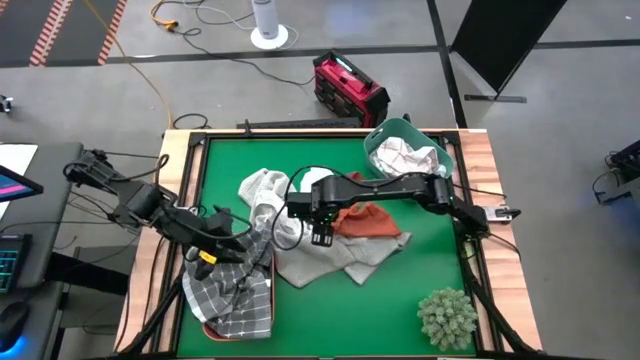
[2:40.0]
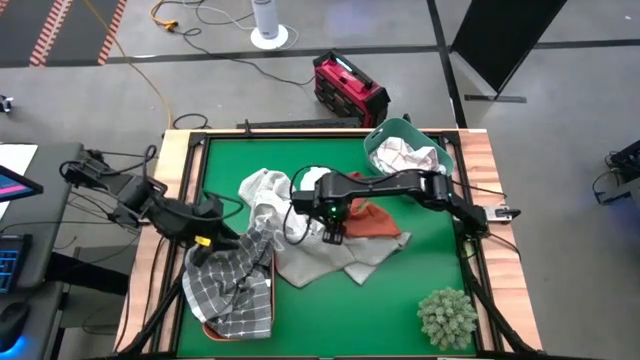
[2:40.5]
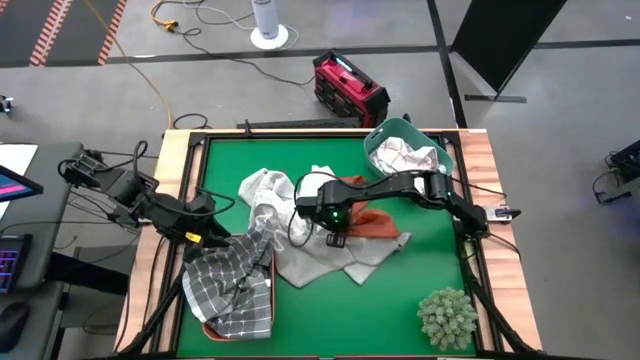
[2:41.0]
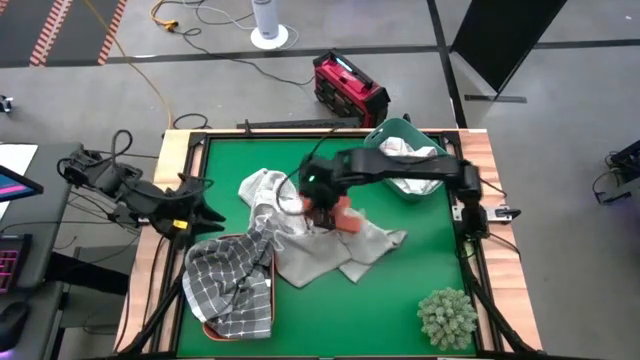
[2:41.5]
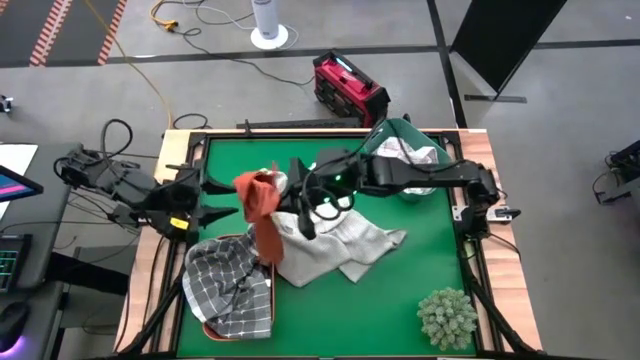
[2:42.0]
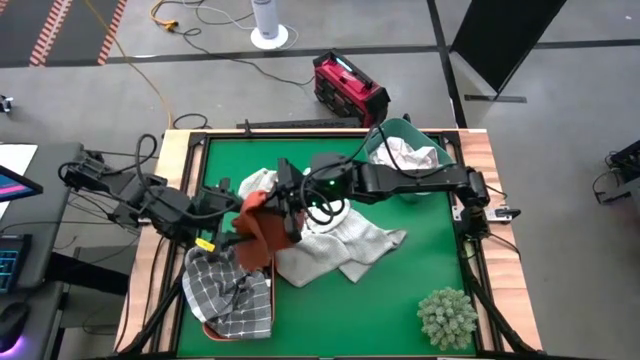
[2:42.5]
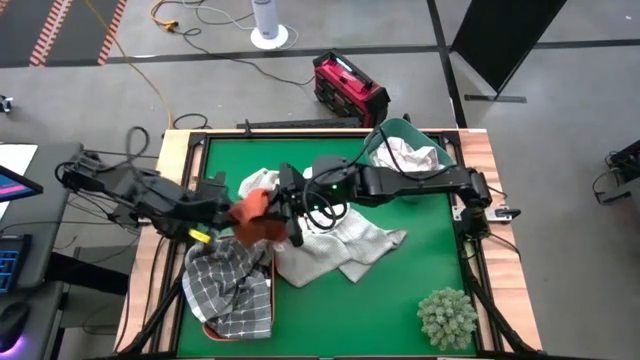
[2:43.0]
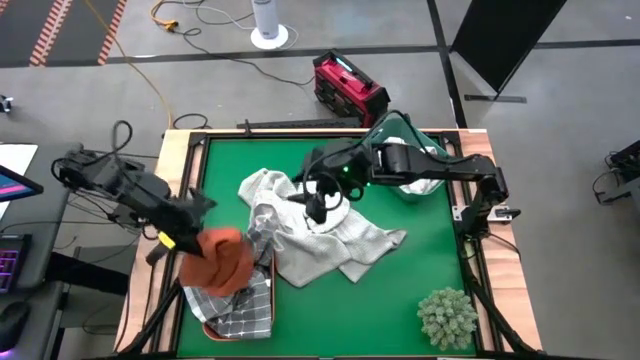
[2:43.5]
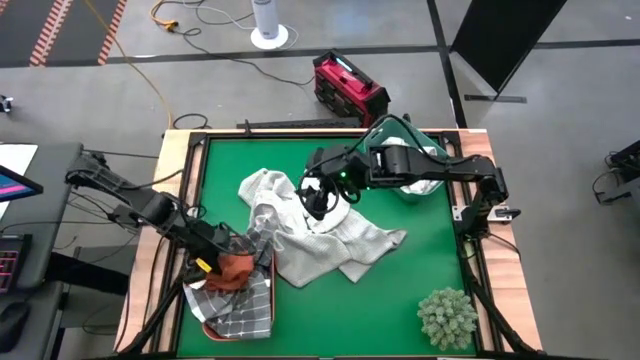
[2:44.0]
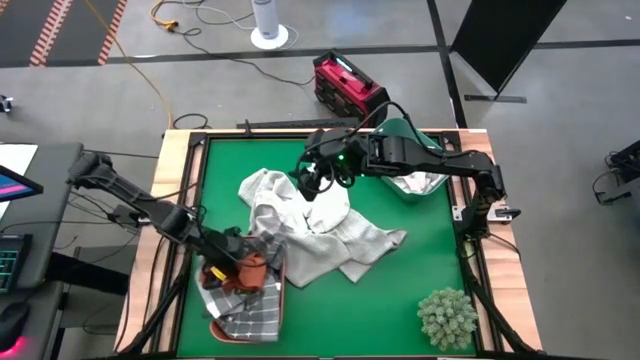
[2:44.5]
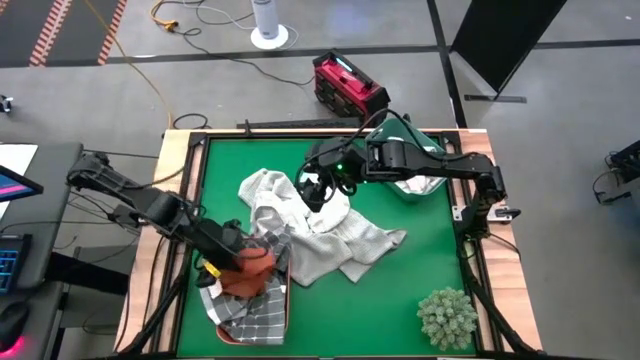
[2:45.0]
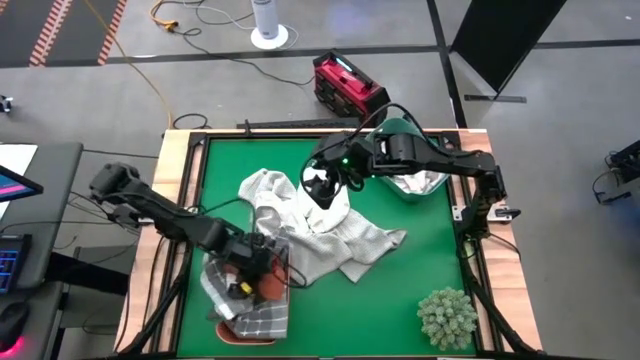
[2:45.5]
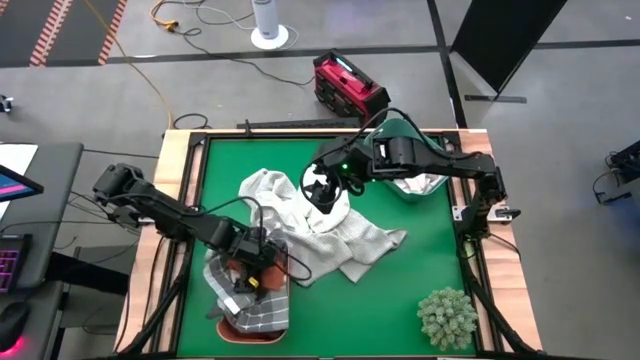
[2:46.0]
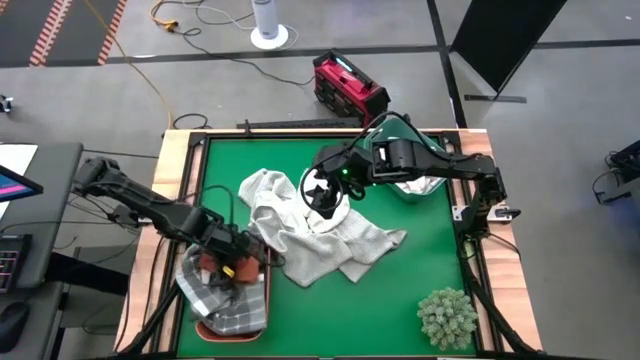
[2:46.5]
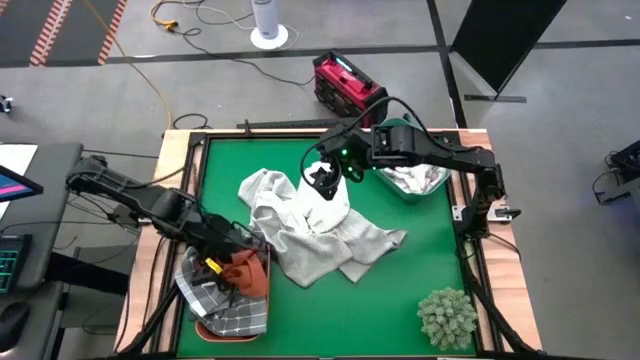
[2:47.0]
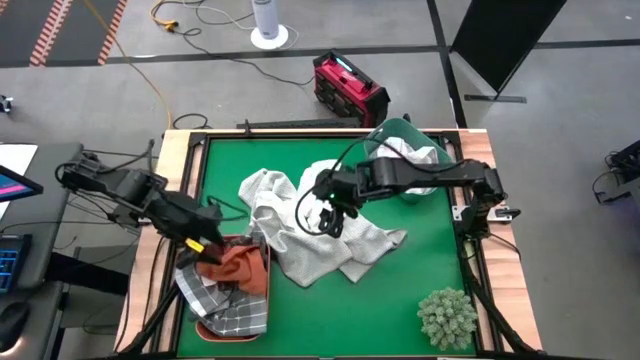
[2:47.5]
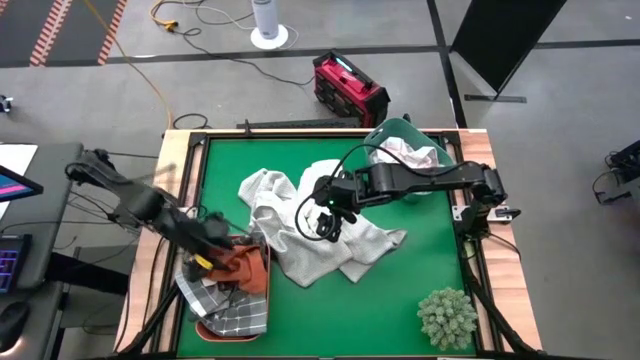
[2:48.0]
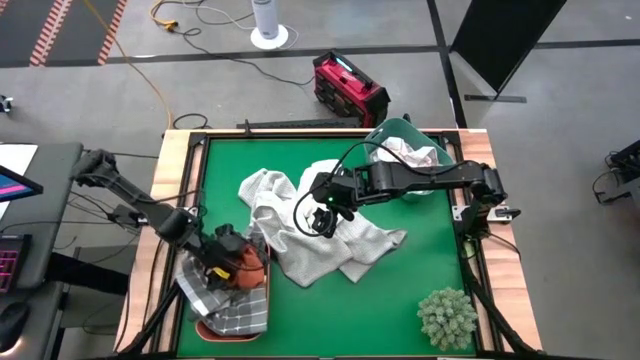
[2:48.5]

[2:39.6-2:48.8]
Task: Sort towels by color in basket
Put the orange towel into the orange bin

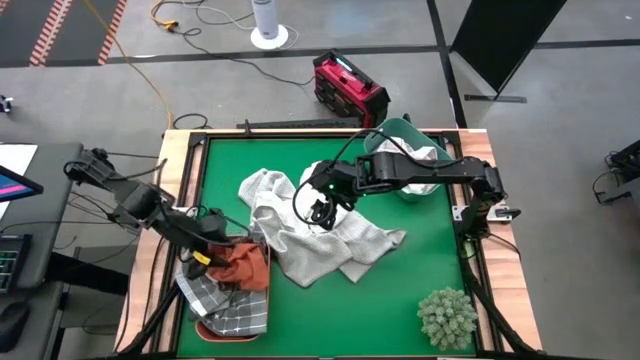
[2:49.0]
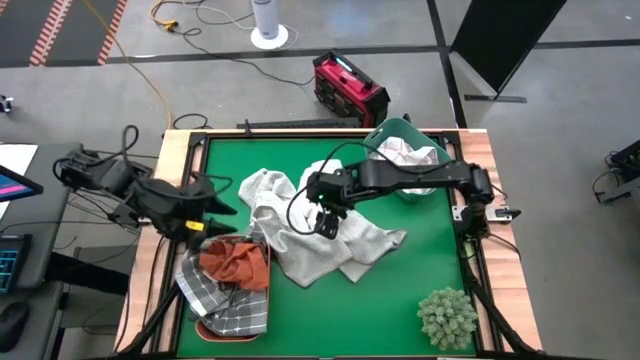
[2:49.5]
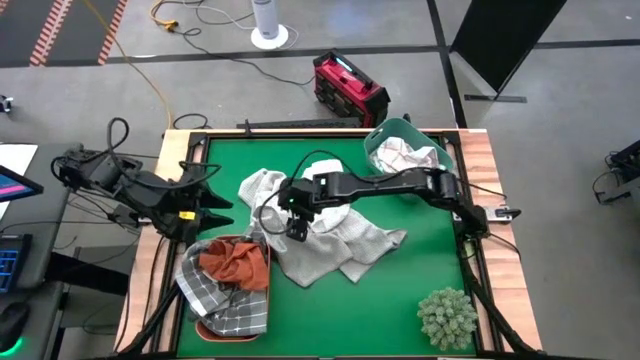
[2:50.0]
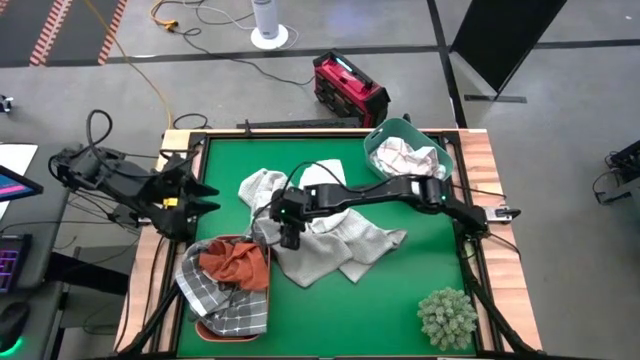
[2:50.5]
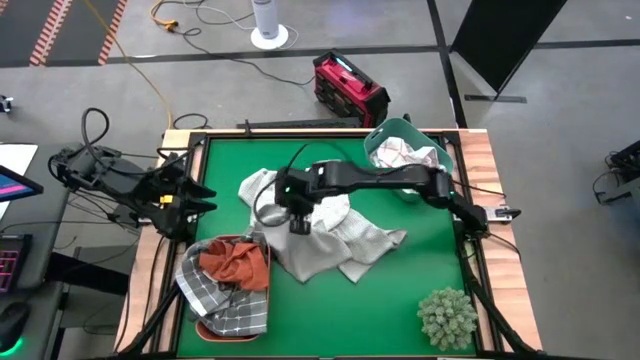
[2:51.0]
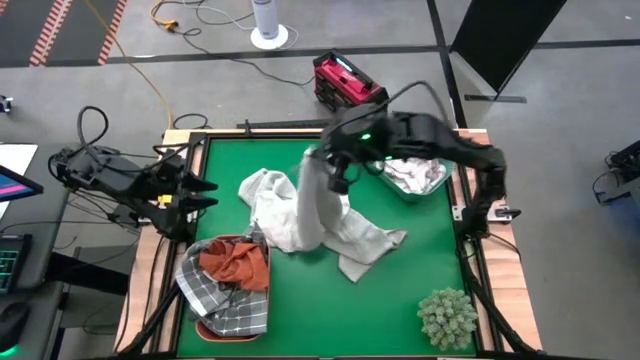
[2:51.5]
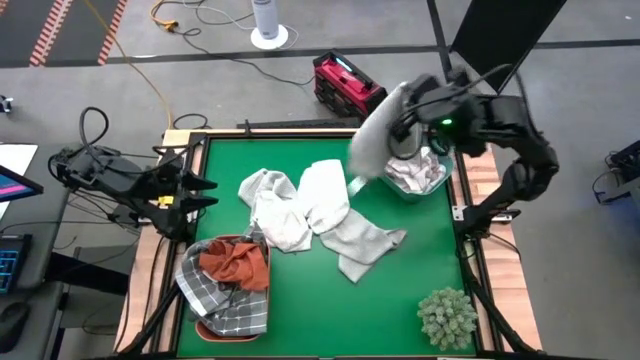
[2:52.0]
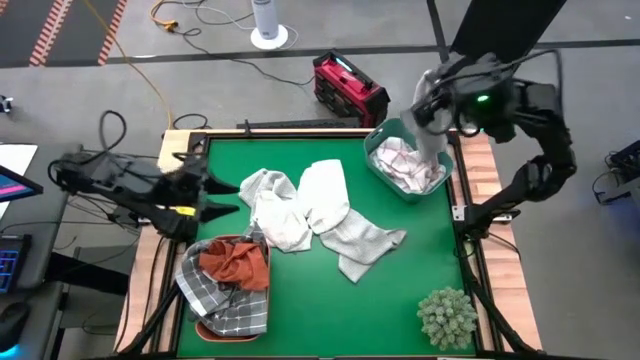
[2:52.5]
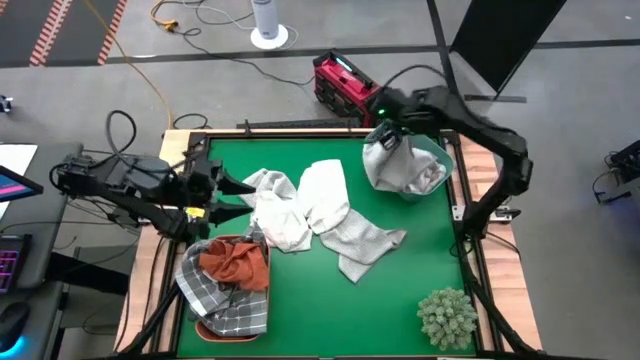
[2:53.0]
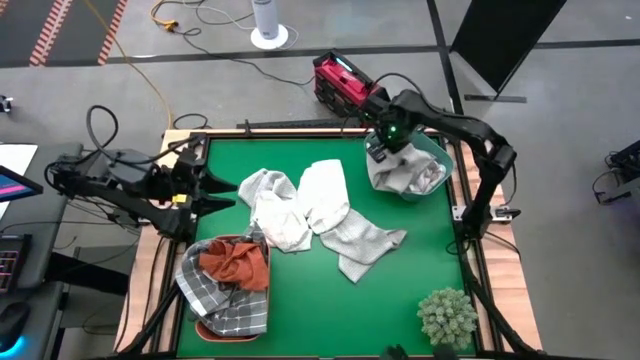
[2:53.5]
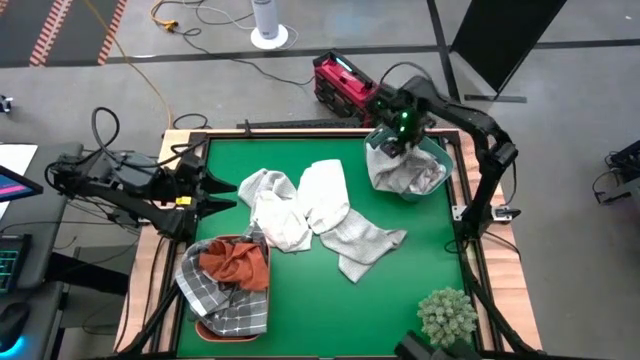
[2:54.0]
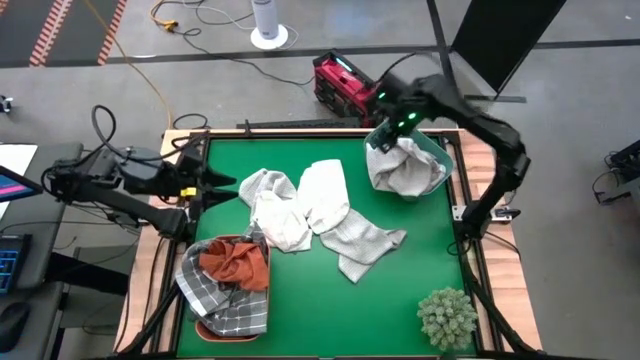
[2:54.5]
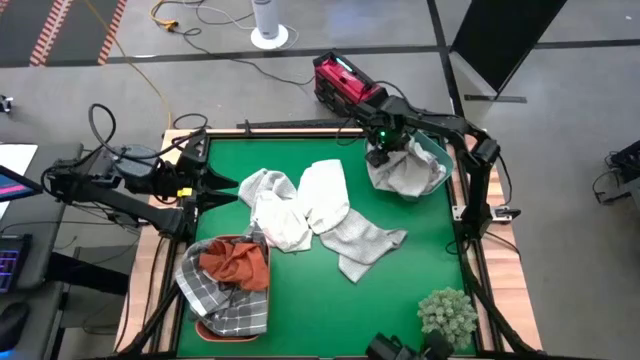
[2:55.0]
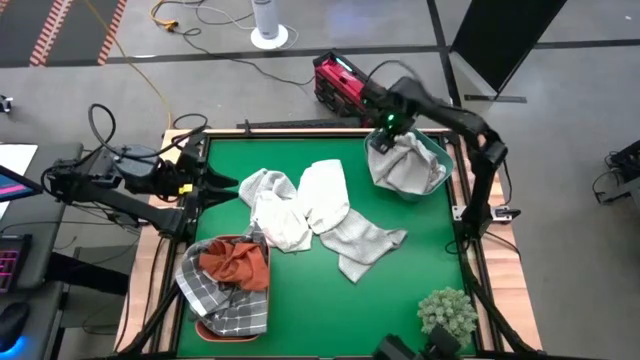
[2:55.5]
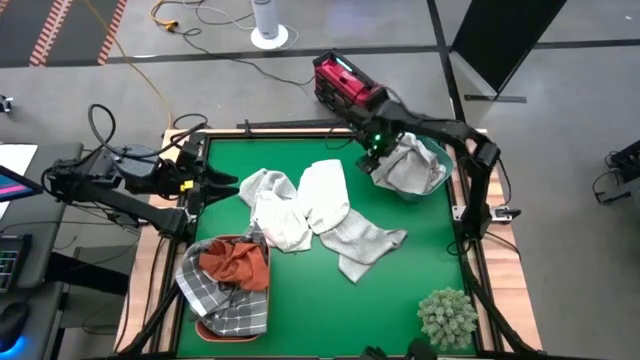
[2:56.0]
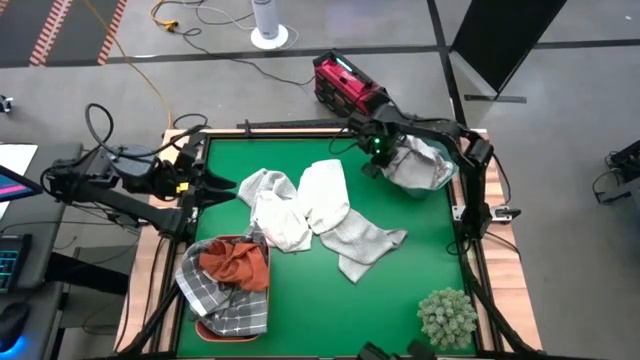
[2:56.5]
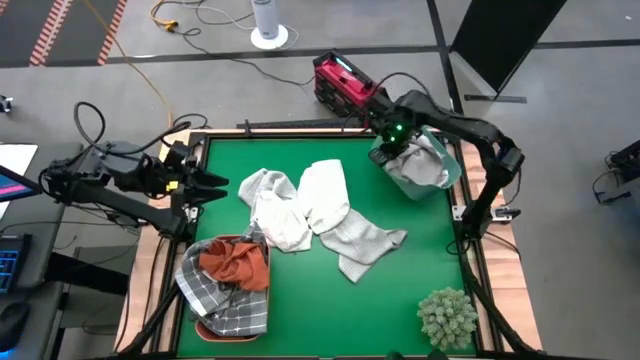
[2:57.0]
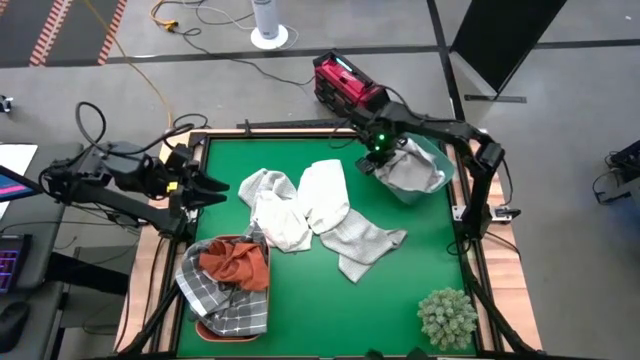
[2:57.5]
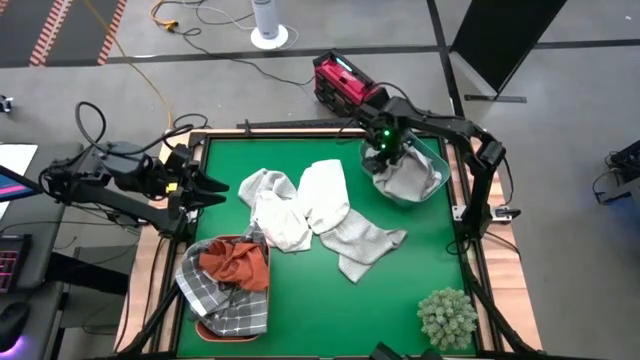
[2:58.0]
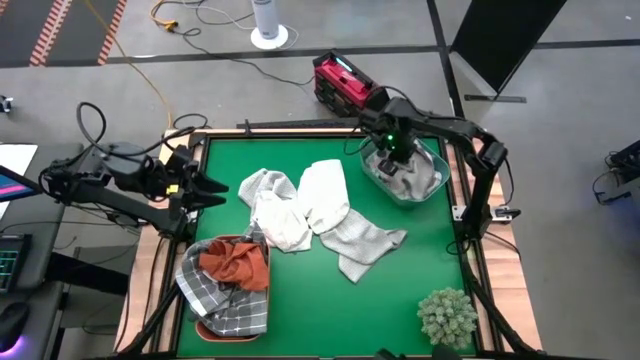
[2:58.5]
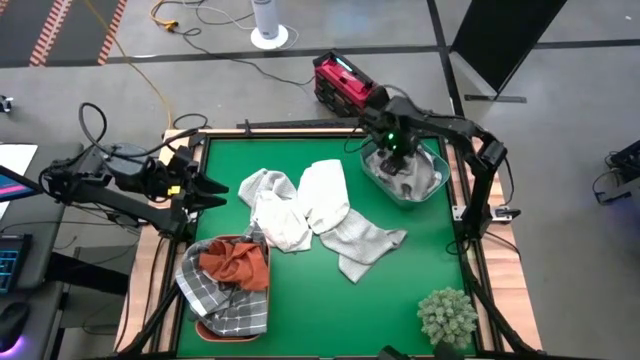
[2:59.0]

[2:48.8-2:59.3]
Put the light gray towel into the green bin
